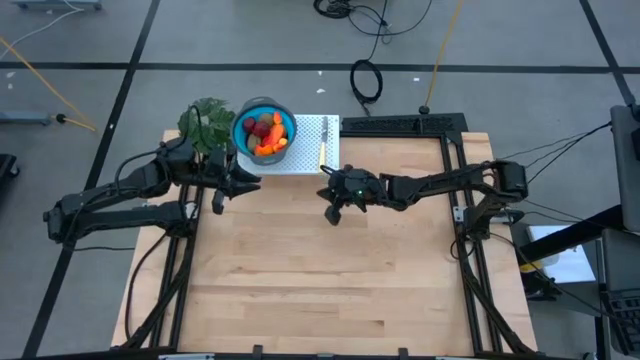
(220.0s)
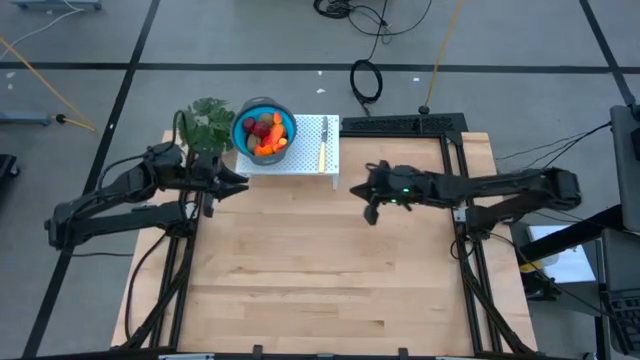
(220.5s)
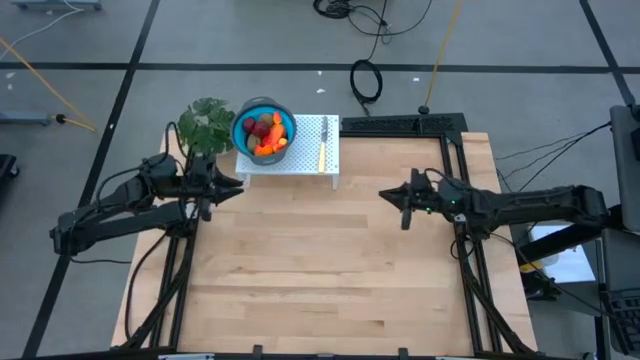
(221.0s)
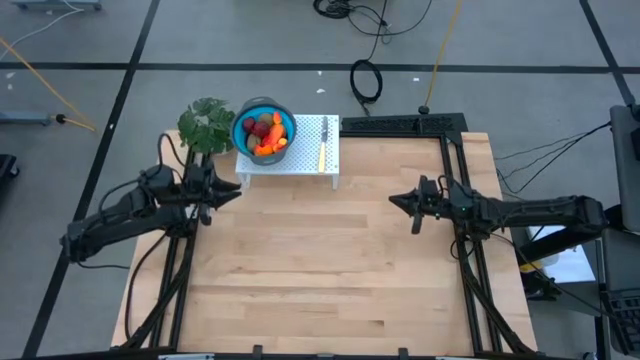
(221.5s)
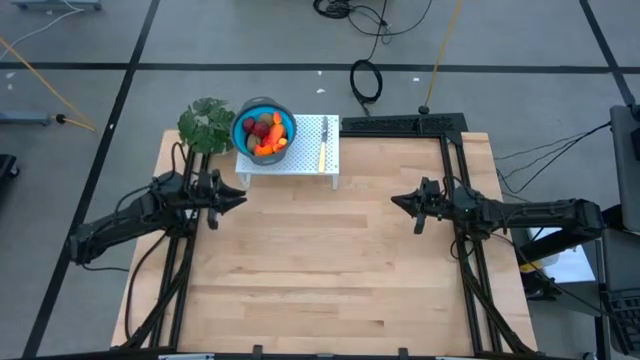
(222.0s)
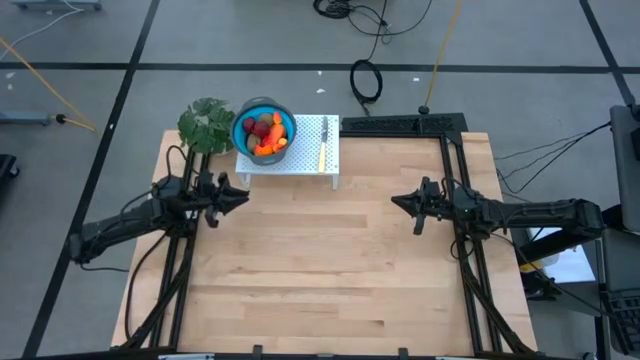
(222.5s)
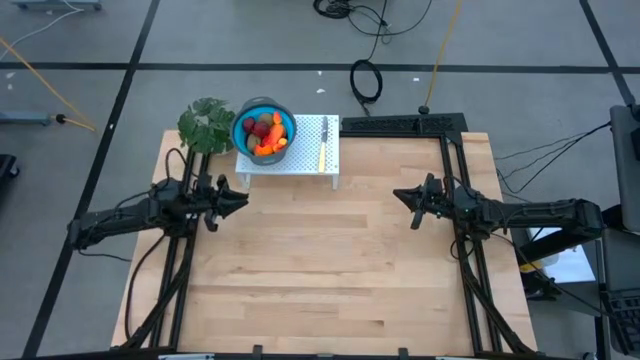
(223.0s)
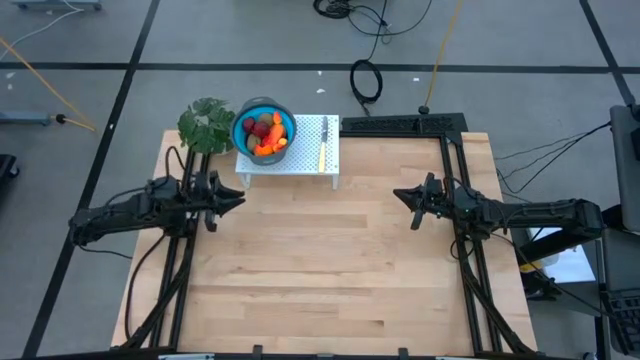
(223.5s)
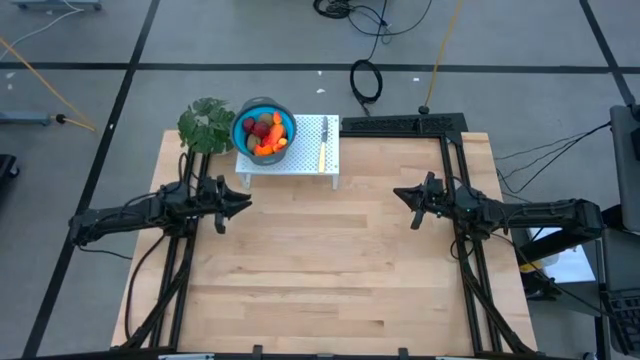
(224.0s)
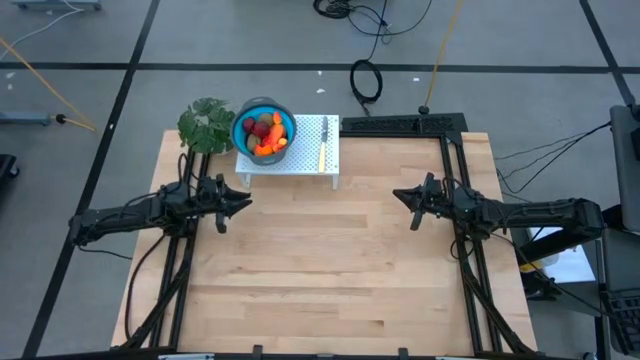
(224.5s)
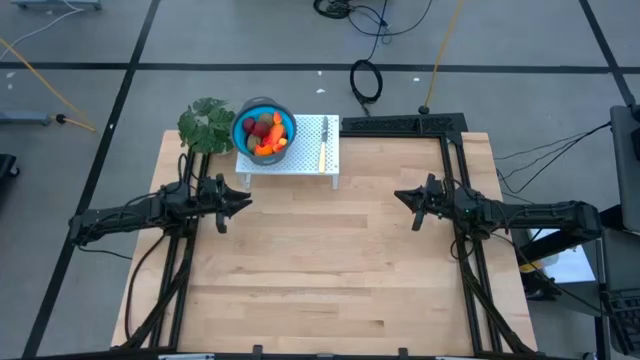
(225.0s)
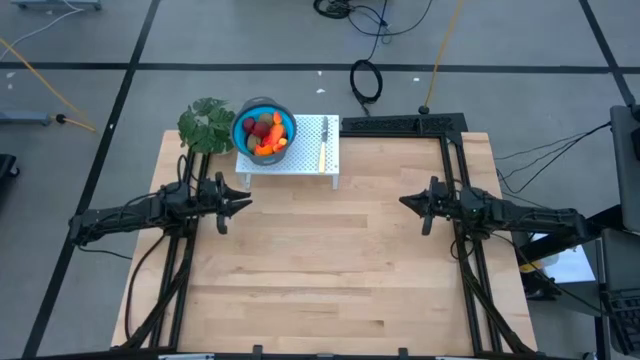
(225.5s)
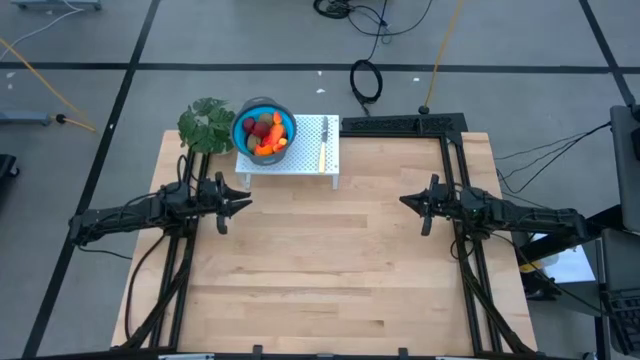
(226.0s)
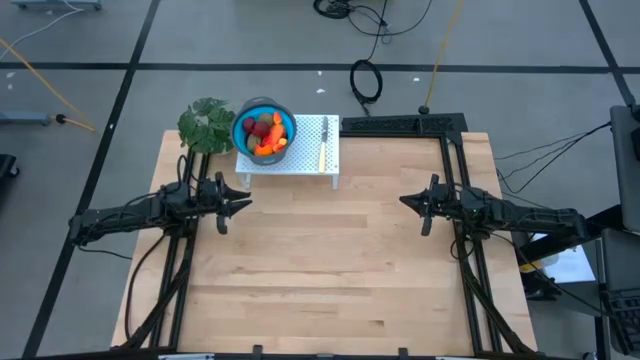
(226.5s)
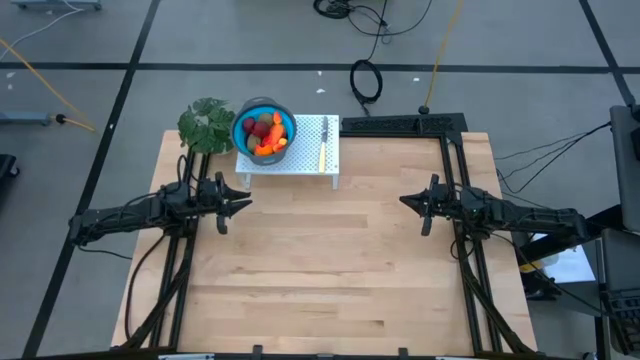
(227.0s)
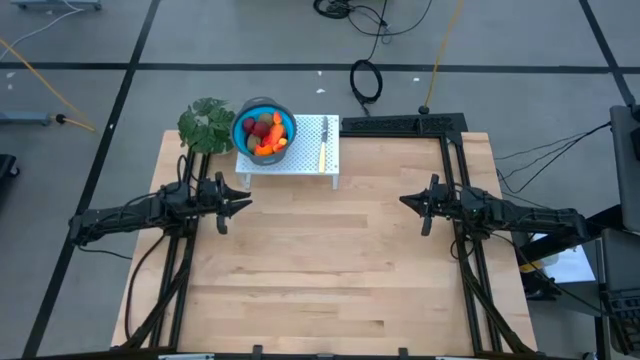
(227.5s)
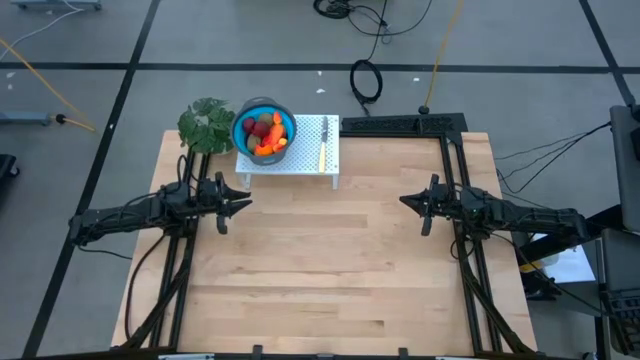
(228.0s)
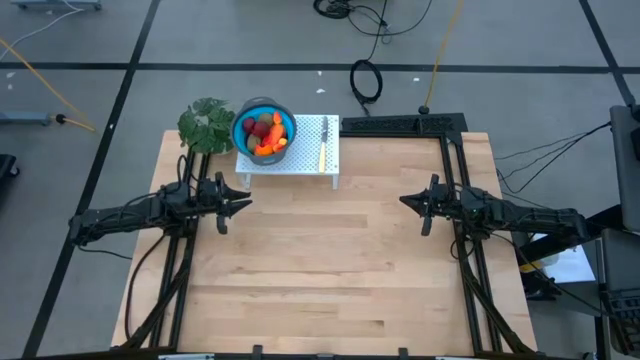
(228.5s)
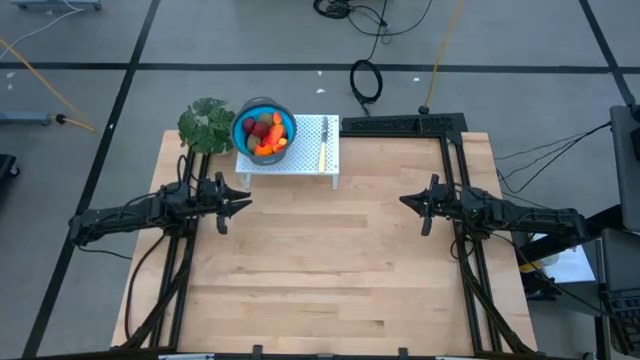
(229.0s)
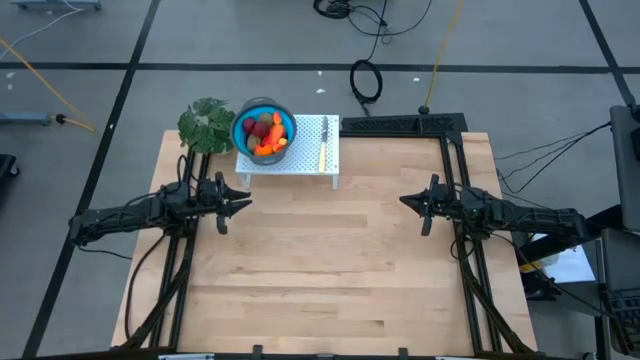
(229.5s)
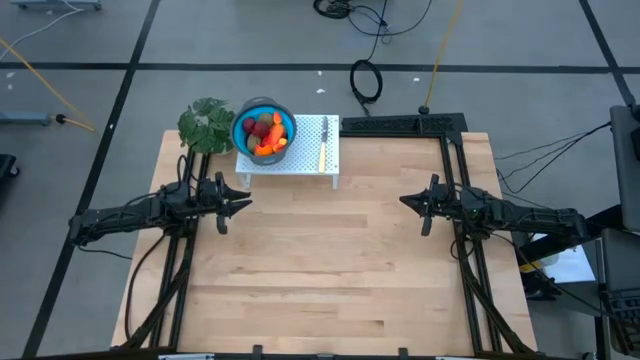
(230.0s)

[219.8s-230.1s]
Task: Pick & Place Fruit
Return to Home Position

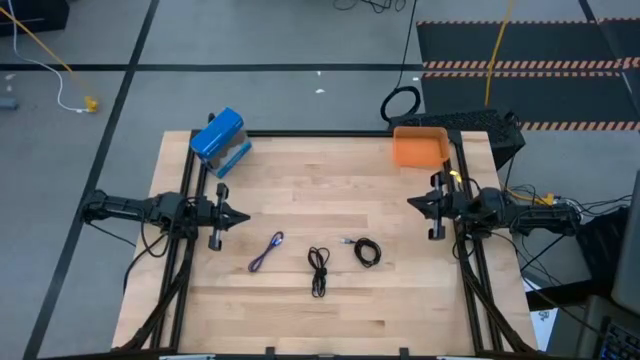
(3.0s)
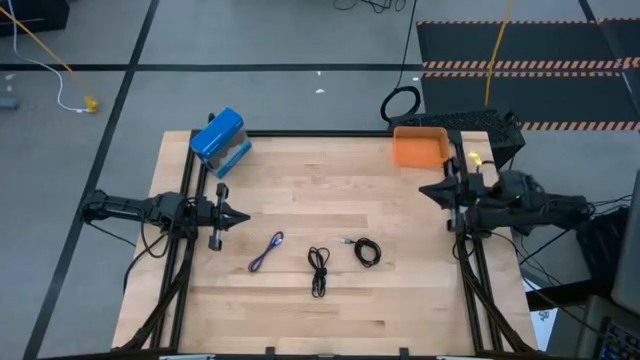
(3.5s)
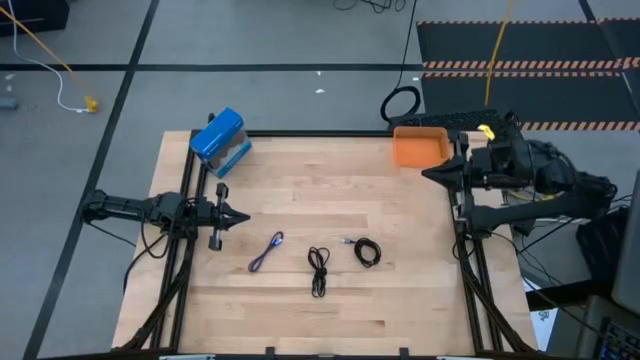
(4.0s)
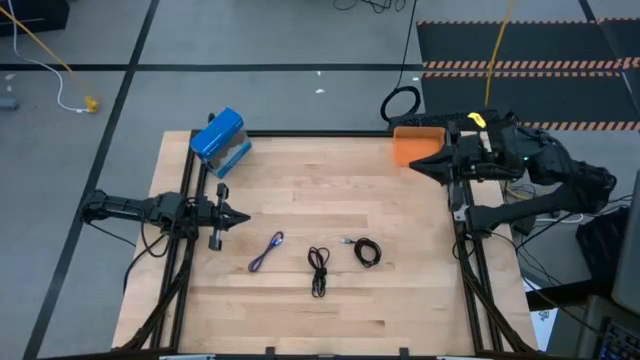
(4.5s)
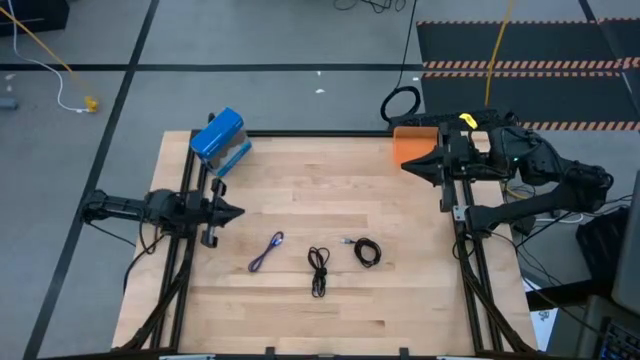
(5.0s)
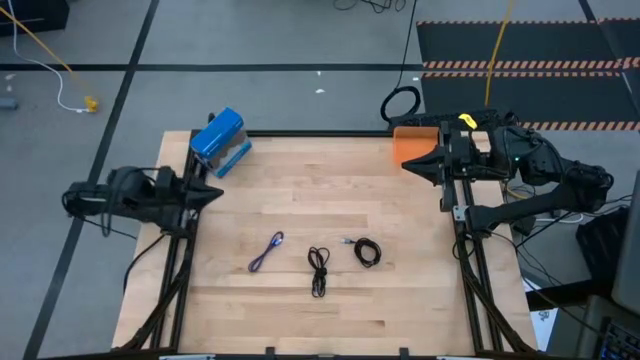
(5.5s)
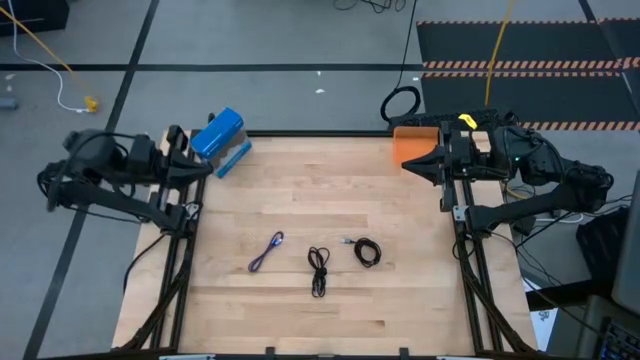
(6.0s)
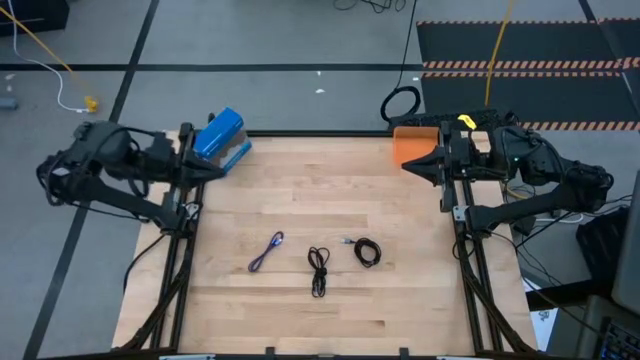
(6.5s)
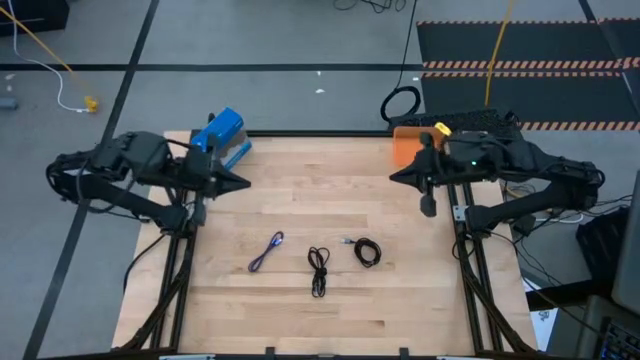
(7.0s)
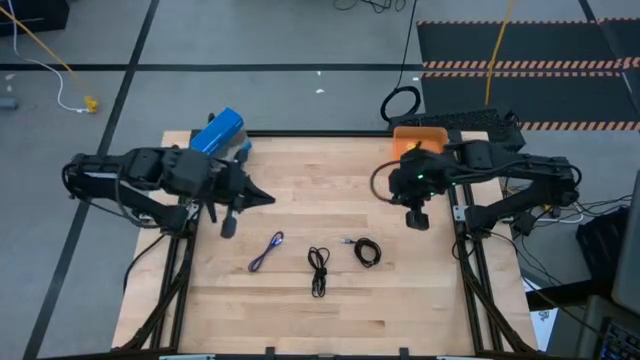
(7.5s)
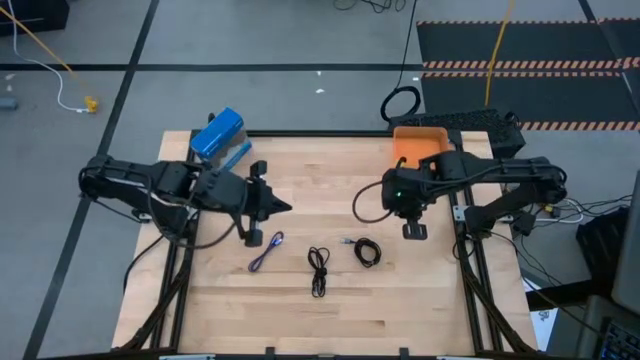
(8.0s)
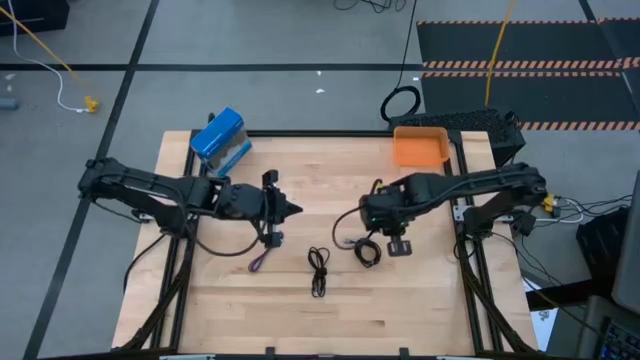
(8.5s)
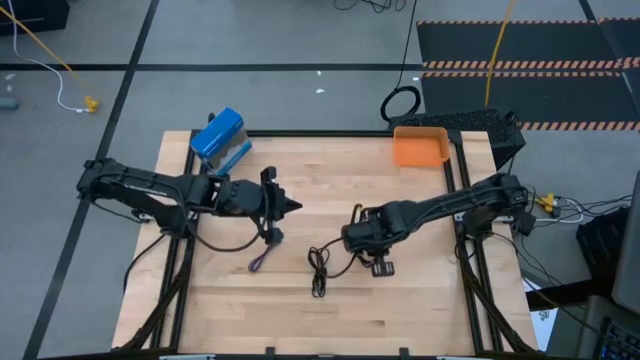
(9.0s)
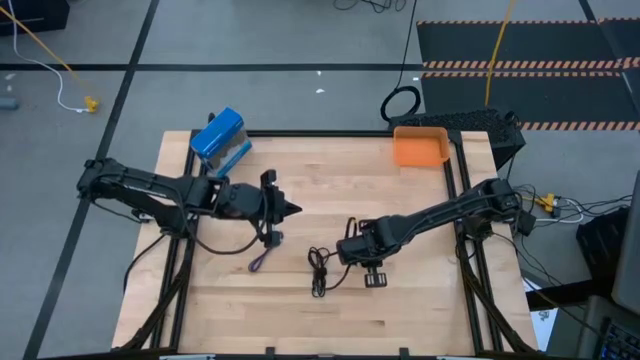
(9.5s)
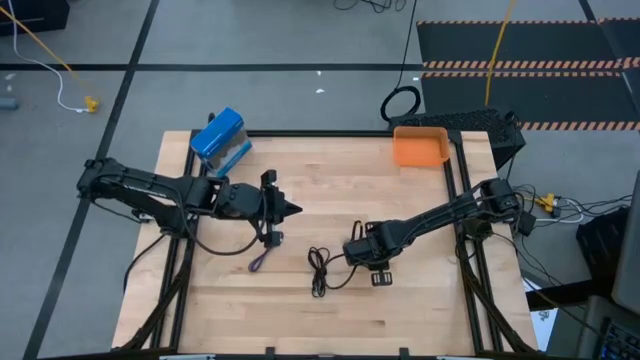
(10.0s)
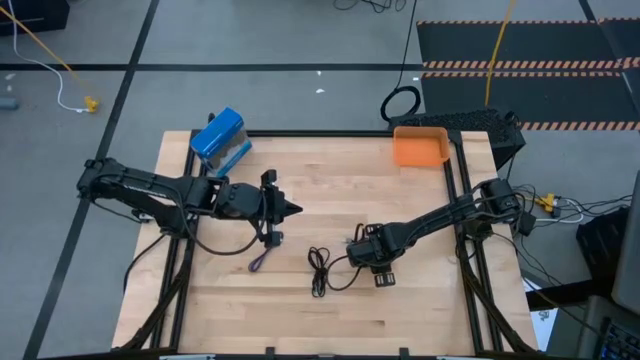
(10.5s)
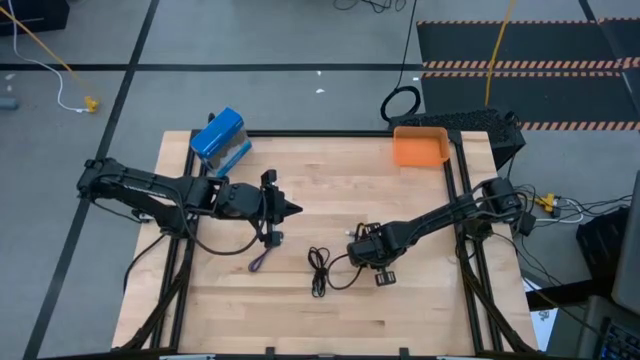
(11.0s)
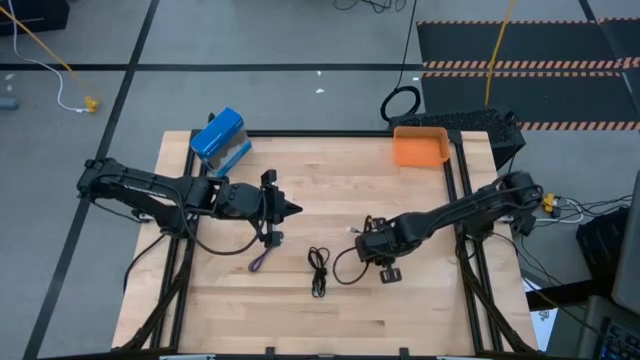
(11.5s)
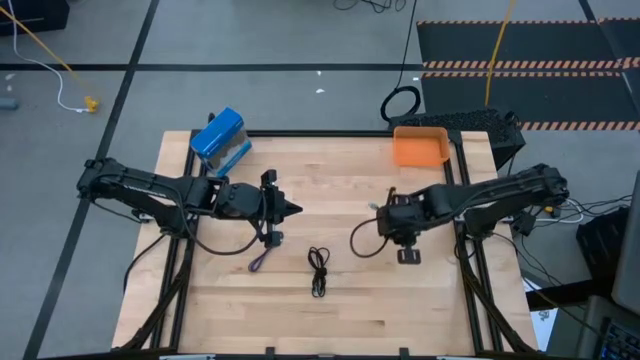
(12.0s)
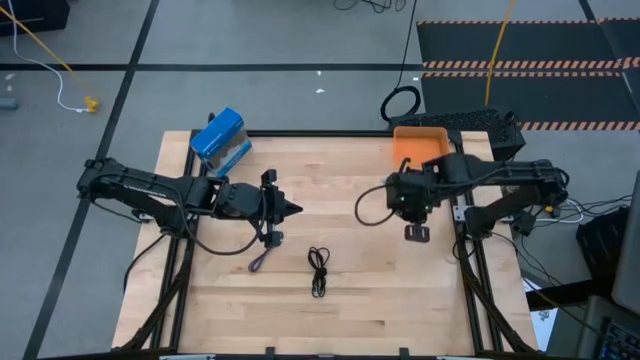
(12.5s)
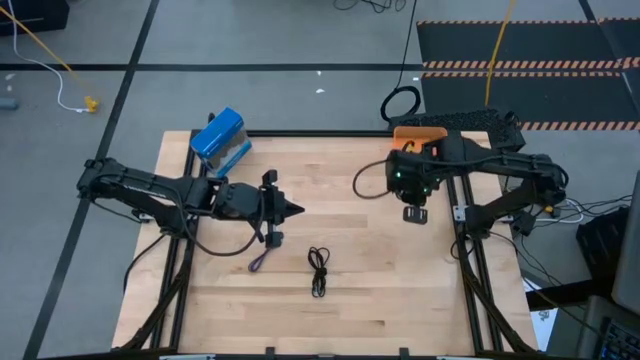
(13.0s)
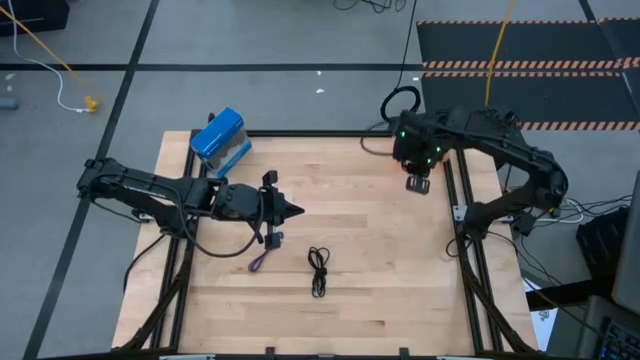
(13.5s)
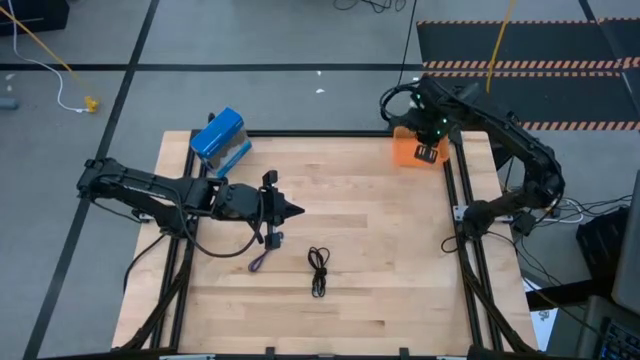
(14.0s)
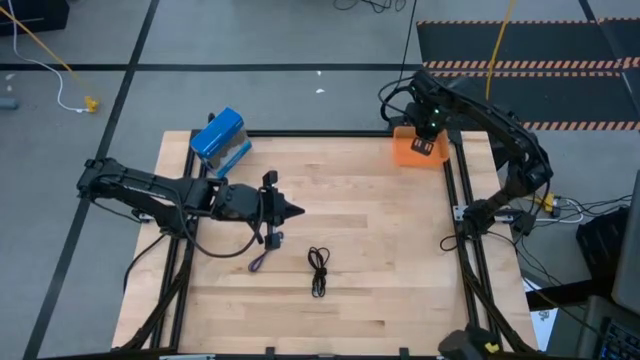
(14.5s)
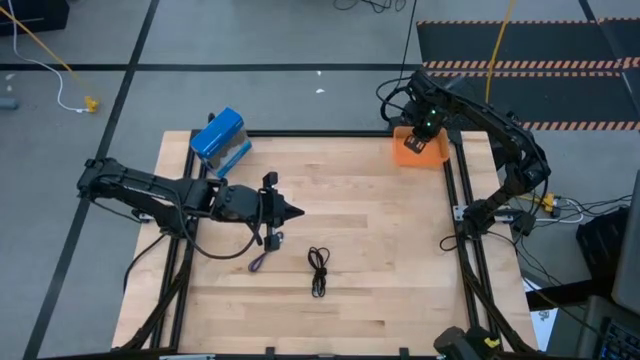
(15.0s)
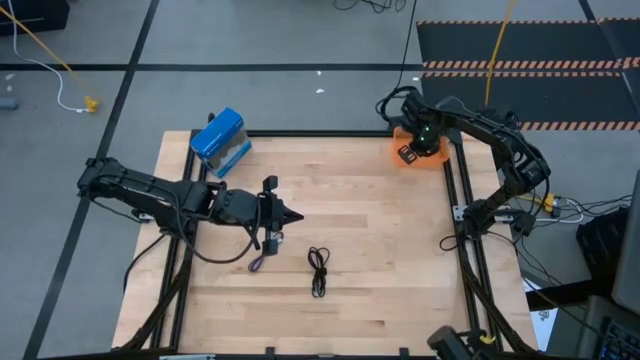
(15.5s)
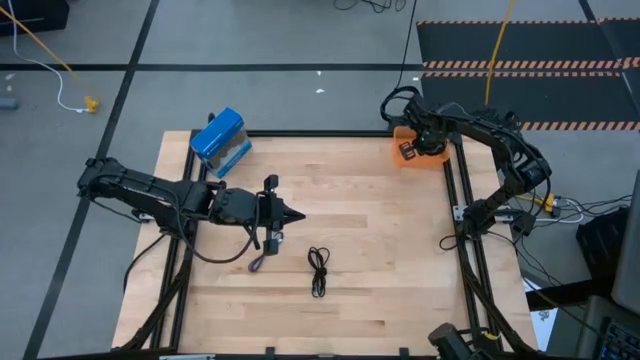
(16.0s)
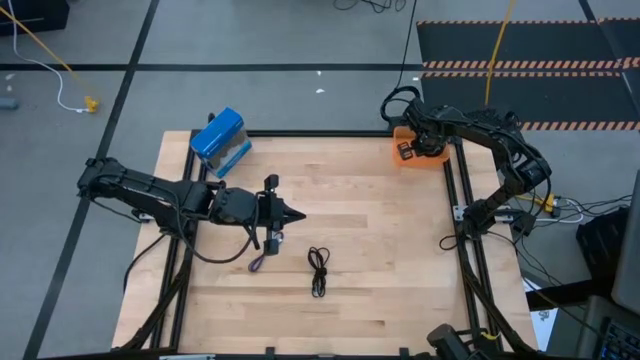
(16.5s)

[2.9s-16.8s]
Task: Pick and place USB-C Cables
Put the right black charger cable into the orange bin
